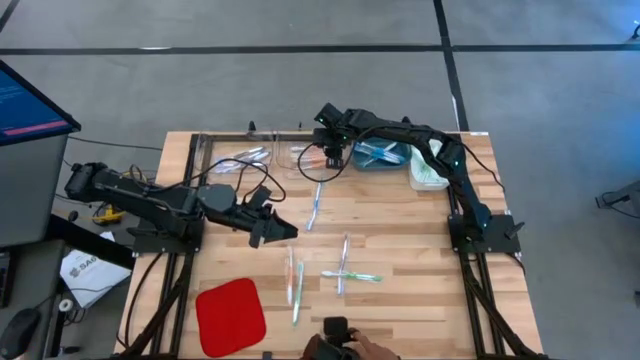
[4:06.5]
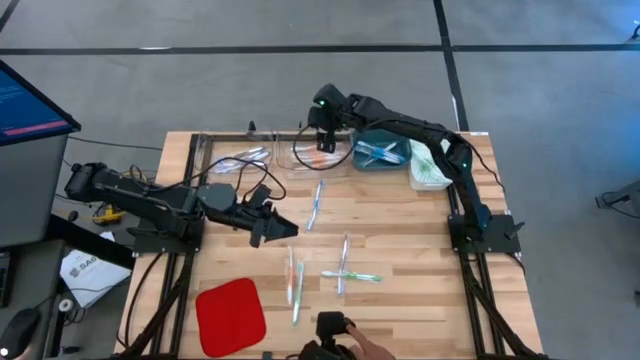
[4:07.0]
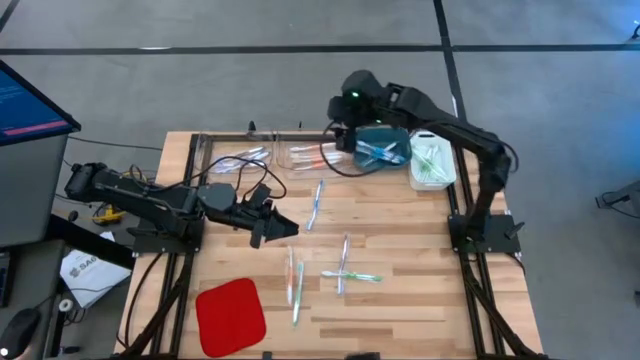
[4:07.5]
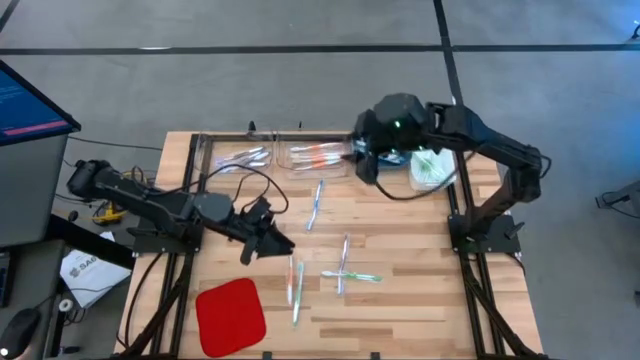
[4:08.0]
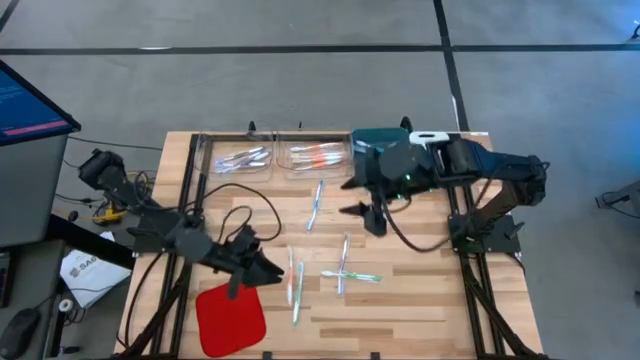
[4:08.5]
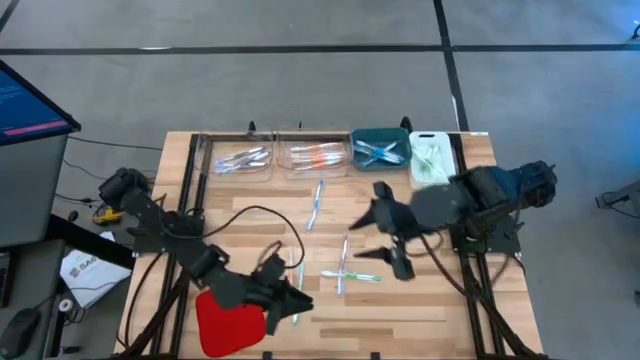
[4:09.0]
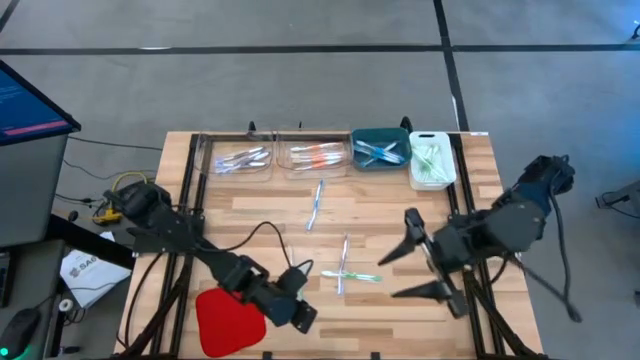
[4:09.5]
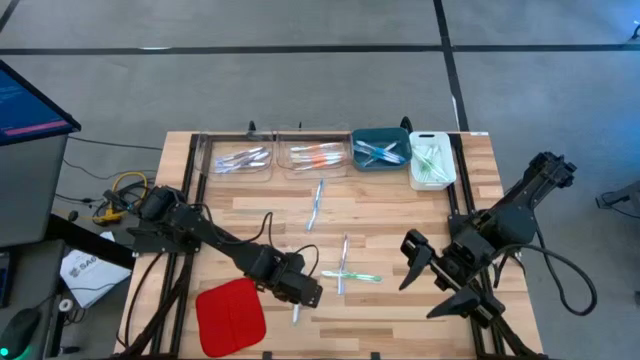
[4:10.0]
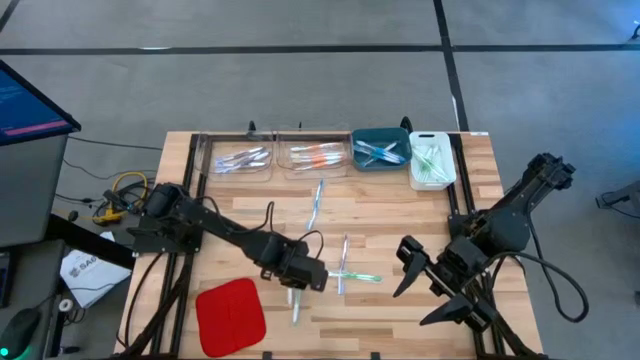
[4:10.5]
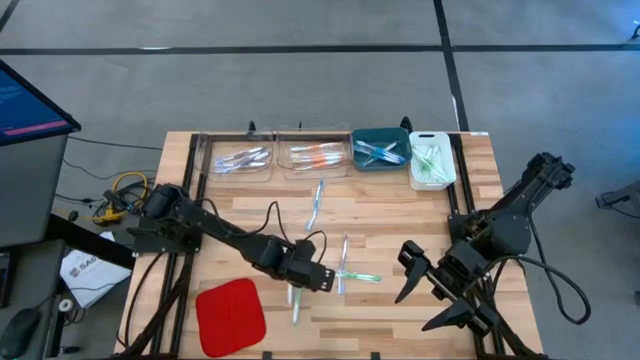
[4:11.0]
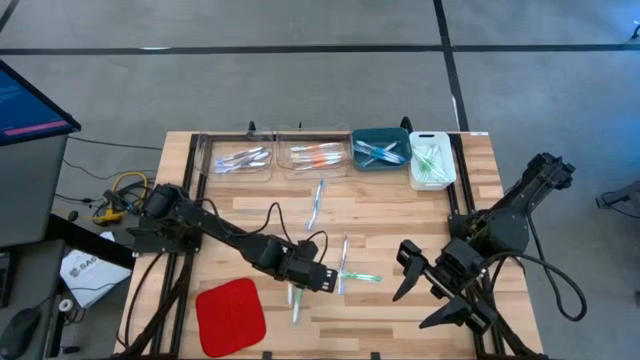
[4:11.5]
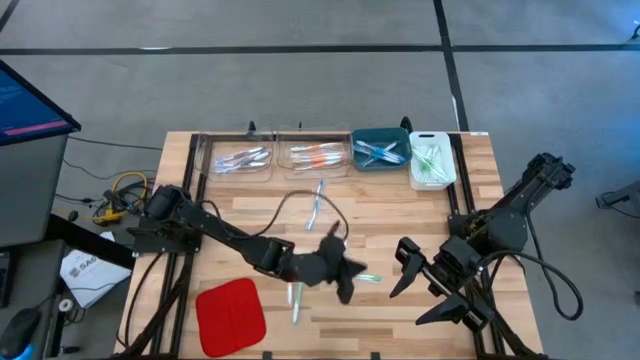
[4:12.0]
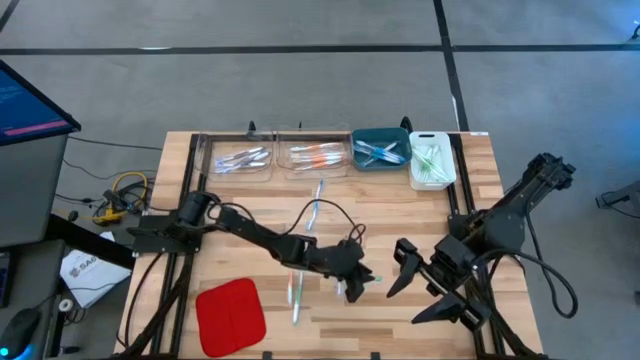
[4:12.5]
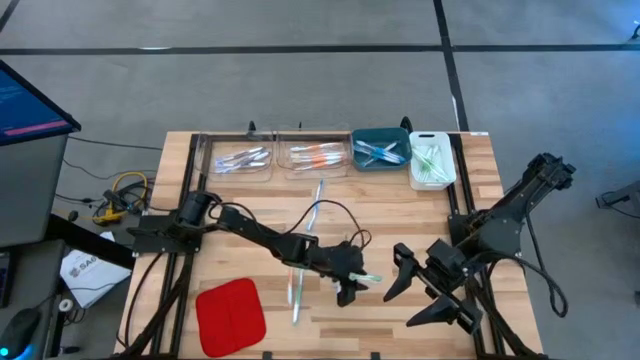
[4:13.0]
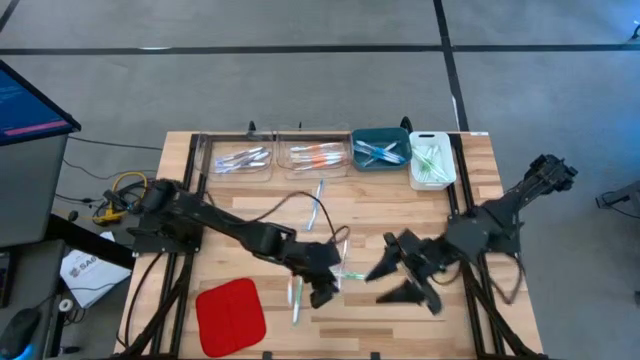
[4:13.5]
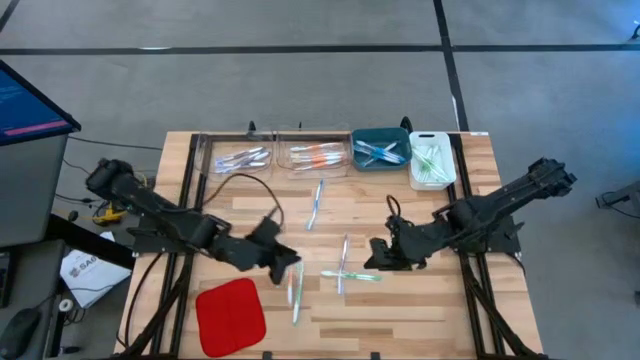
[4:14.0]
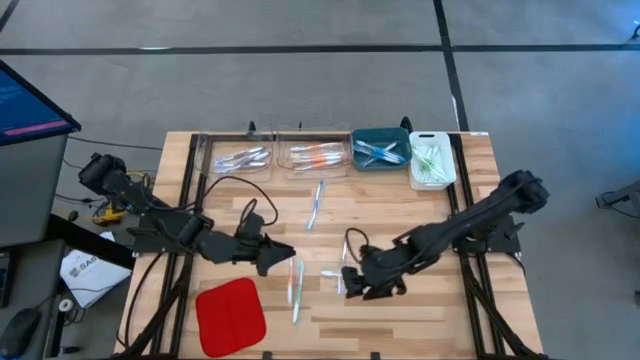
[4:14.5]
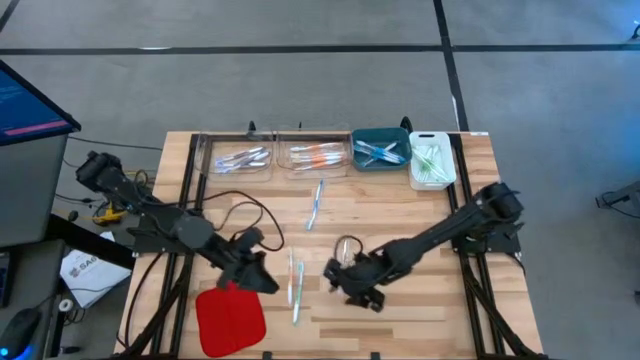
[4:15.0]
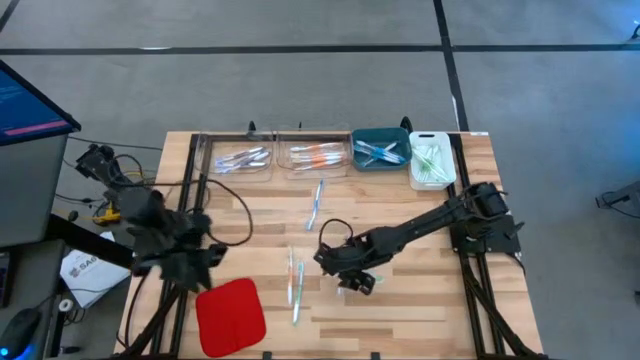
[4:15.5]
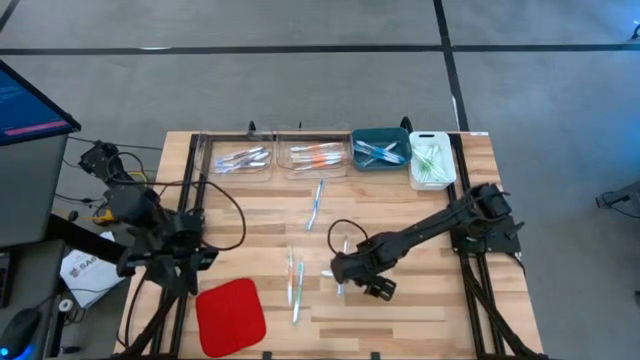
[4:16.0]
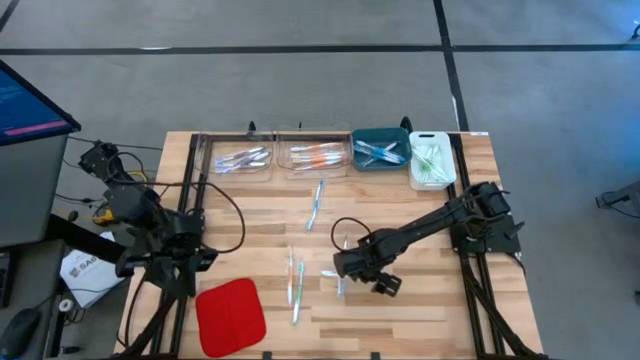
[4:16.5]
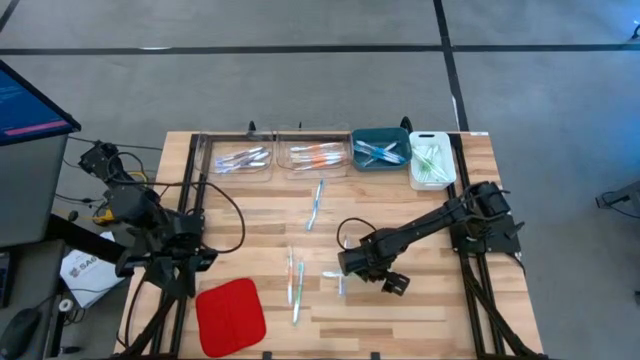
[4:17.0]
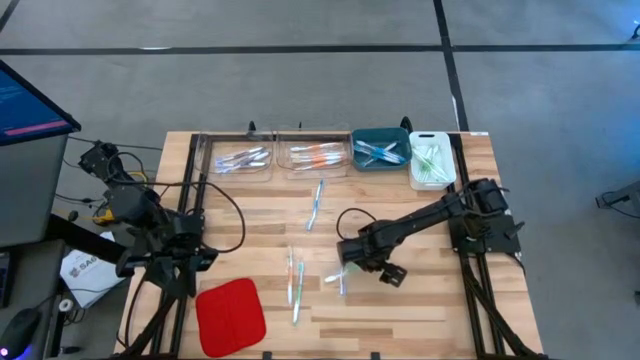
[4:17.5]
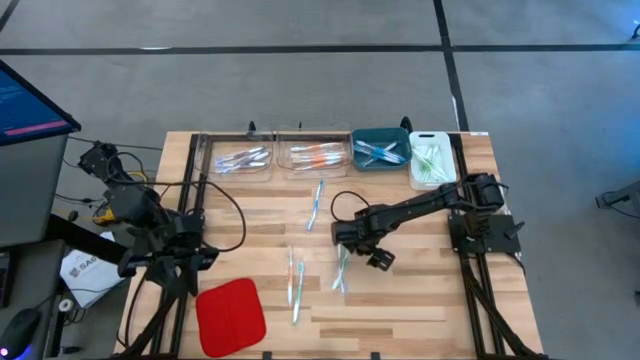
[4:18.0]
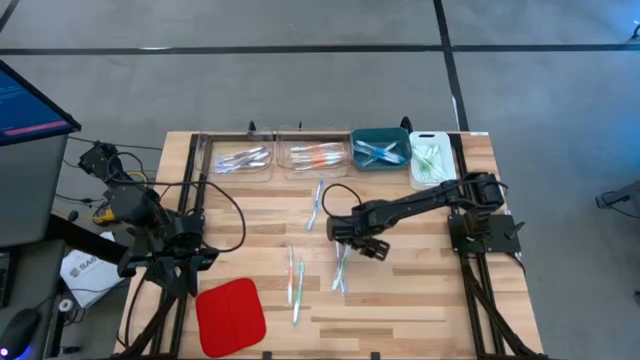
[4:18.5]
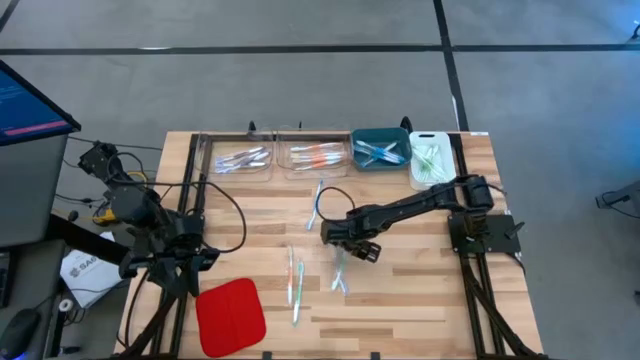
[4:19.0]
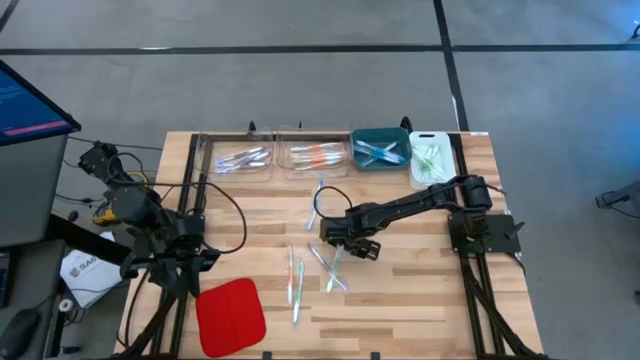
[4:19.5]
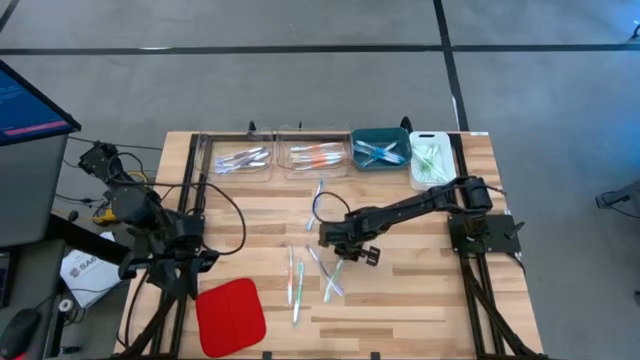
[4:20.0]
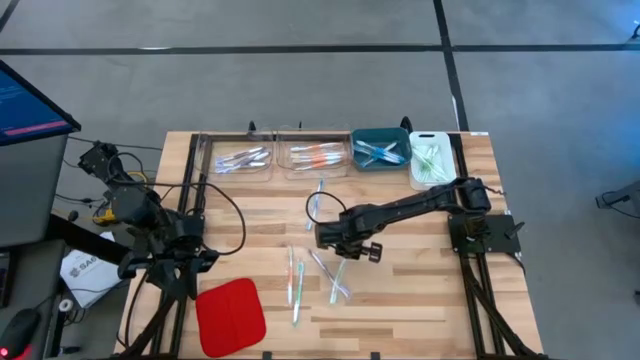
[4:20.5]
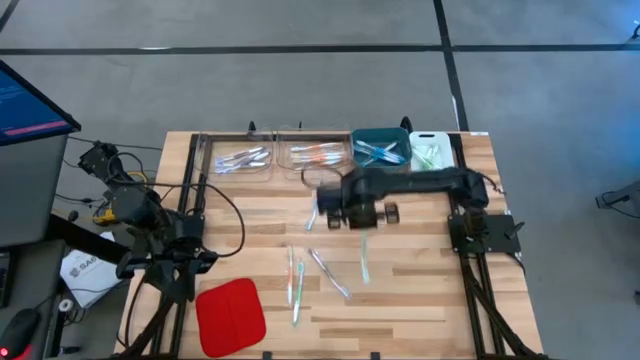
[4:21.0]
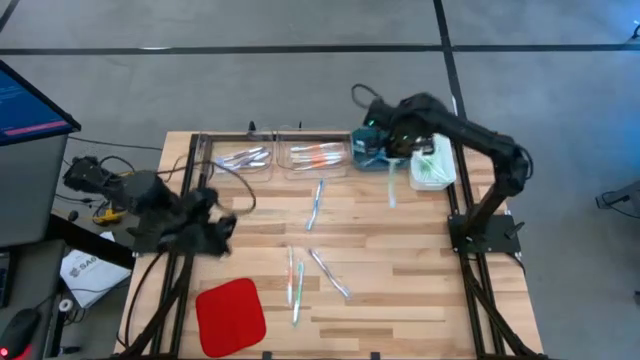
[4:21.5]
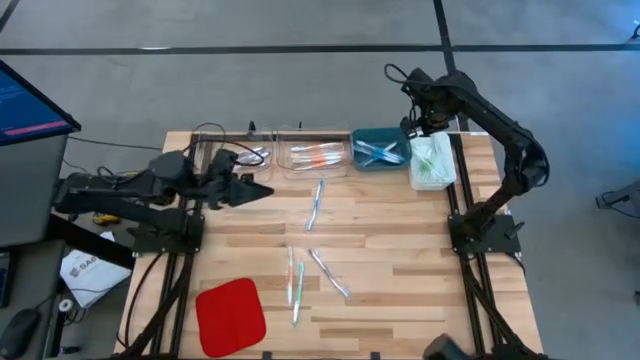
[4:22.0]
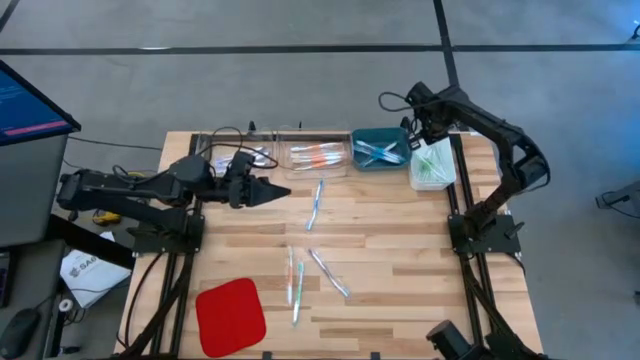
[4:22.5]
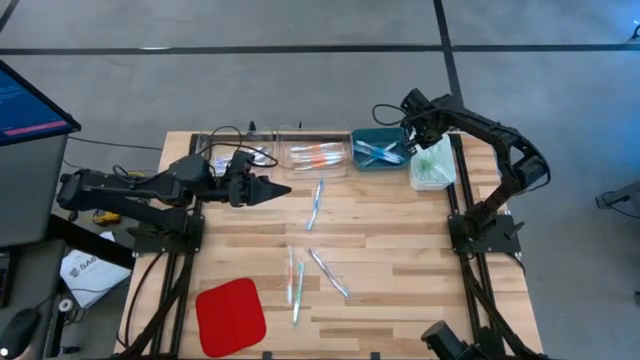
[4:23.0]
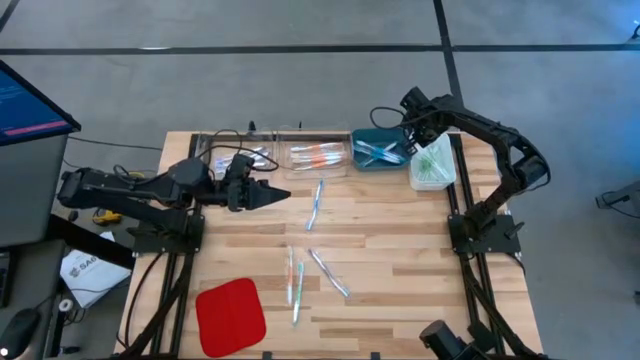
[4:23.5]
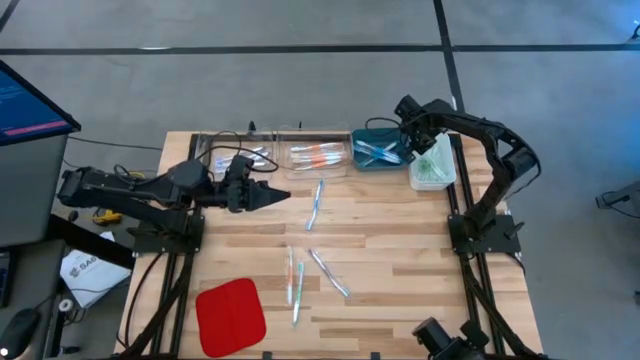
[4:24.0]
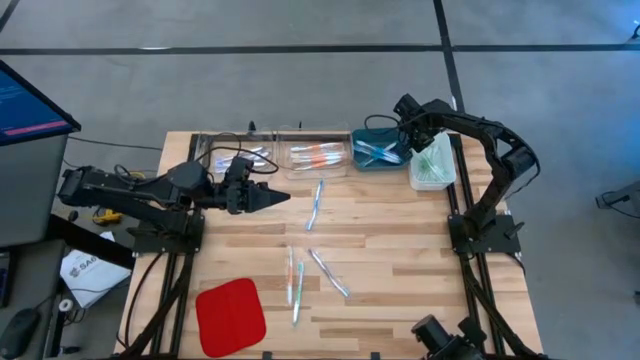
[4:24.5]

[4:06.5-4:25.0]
Task: Pick & Place Toothbrushes
Put the green toothbrush into the white bin
